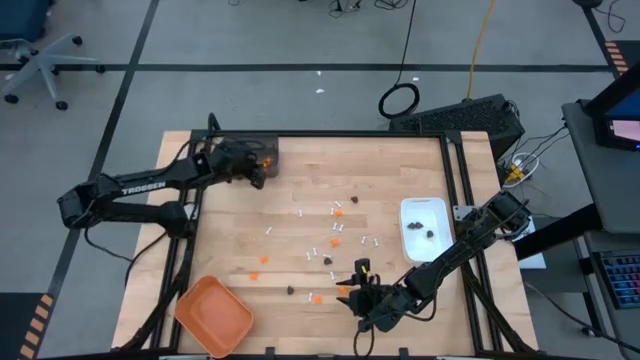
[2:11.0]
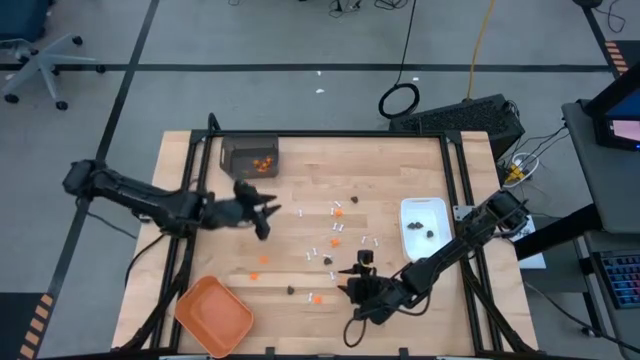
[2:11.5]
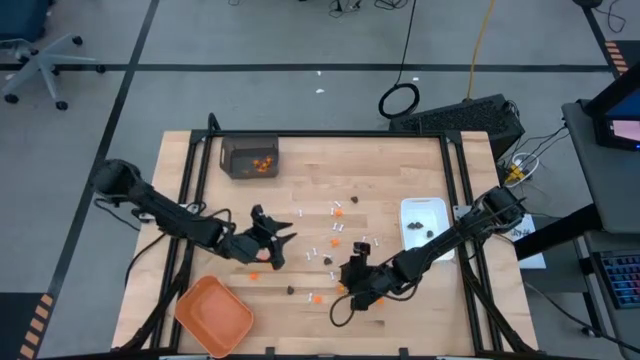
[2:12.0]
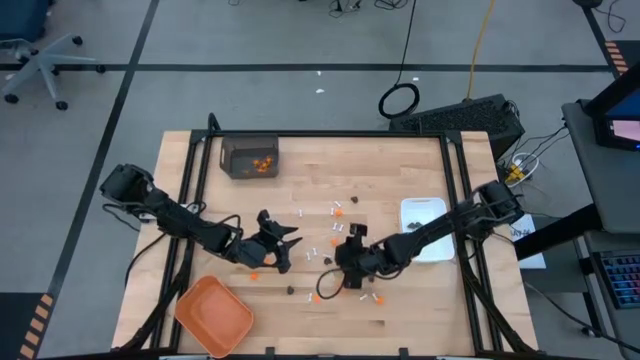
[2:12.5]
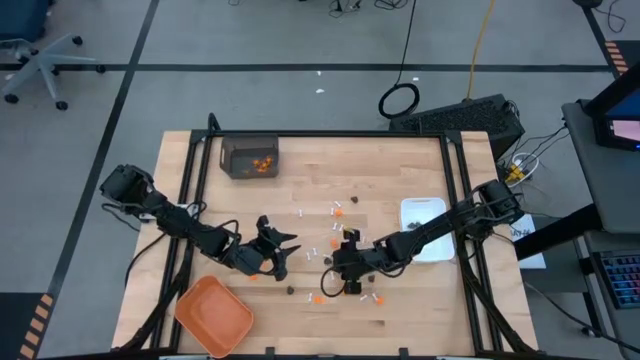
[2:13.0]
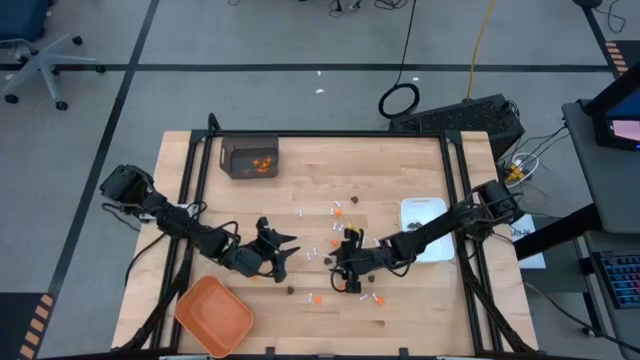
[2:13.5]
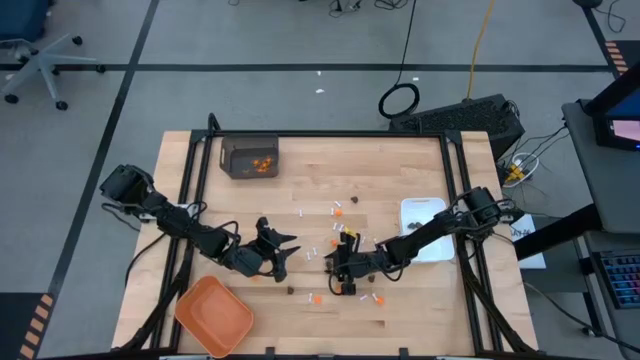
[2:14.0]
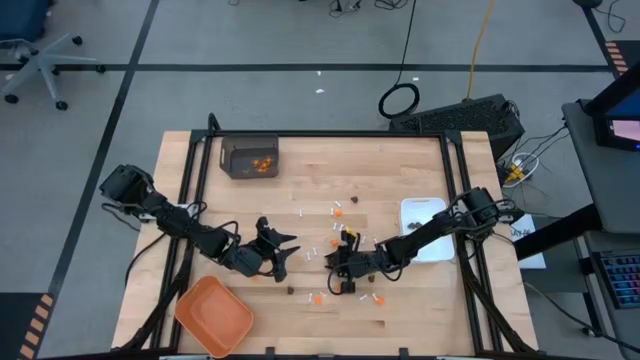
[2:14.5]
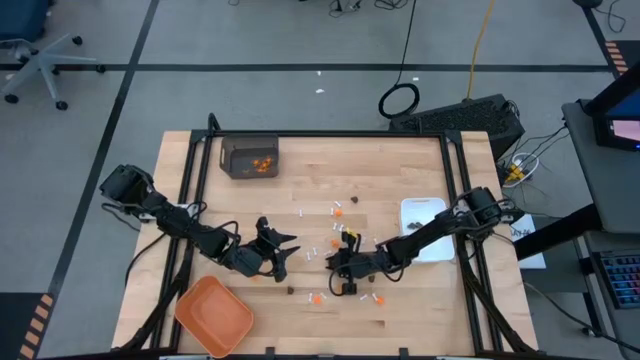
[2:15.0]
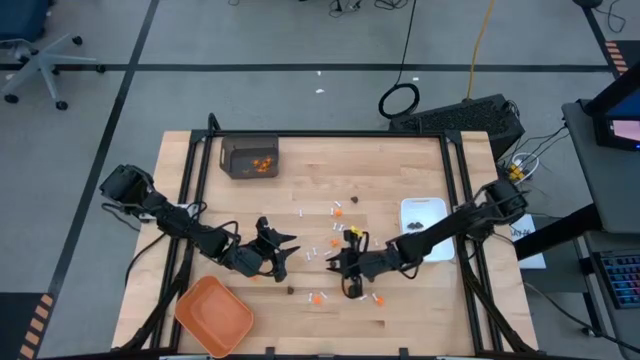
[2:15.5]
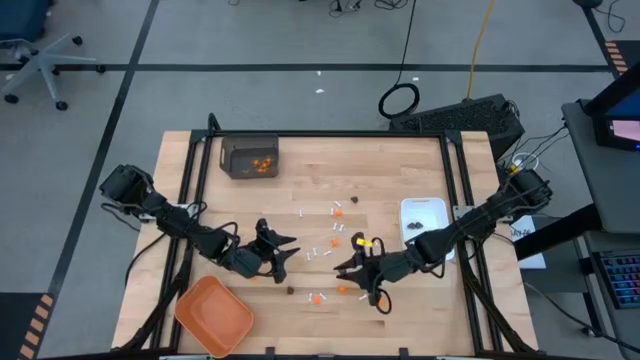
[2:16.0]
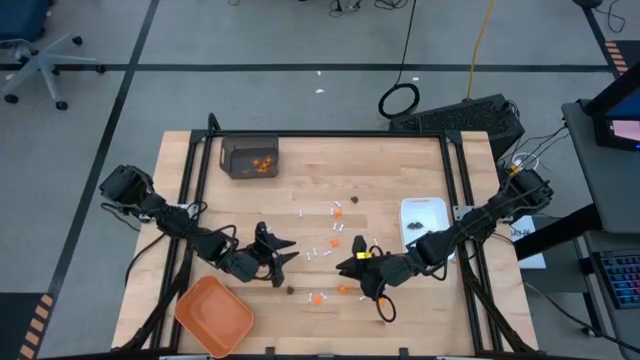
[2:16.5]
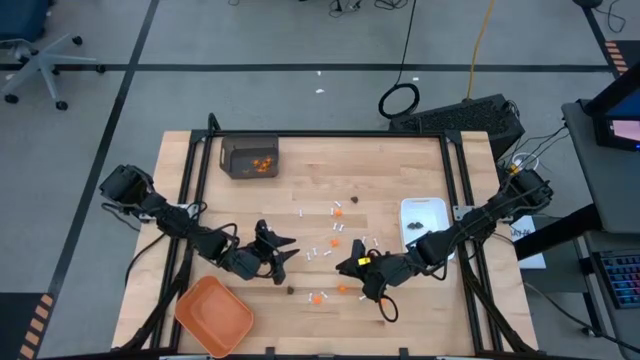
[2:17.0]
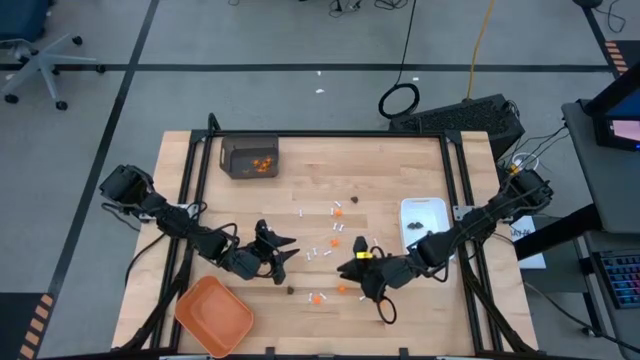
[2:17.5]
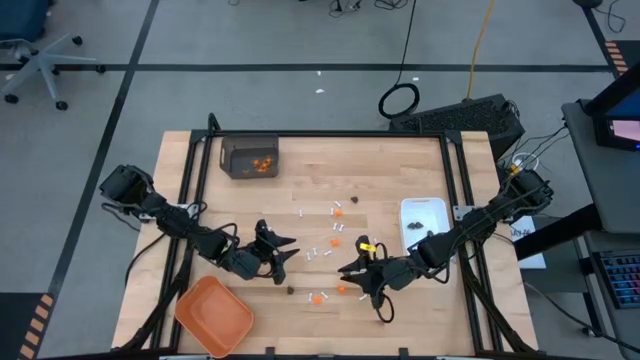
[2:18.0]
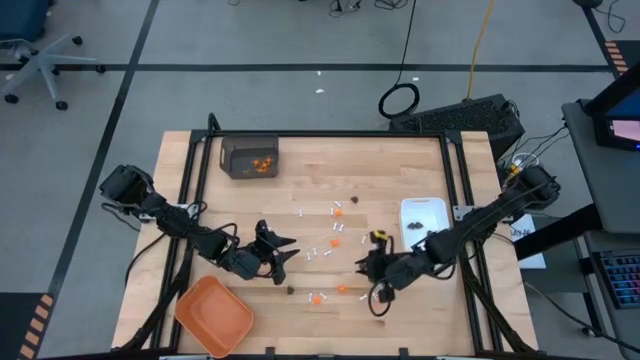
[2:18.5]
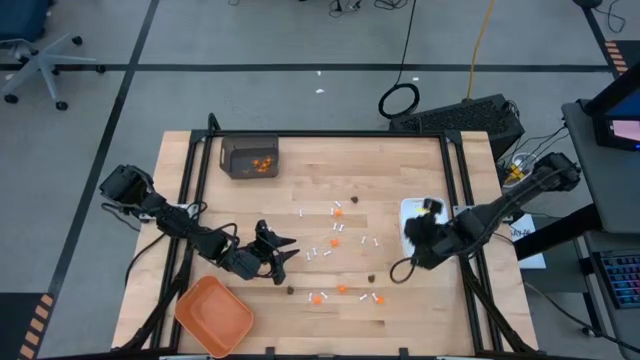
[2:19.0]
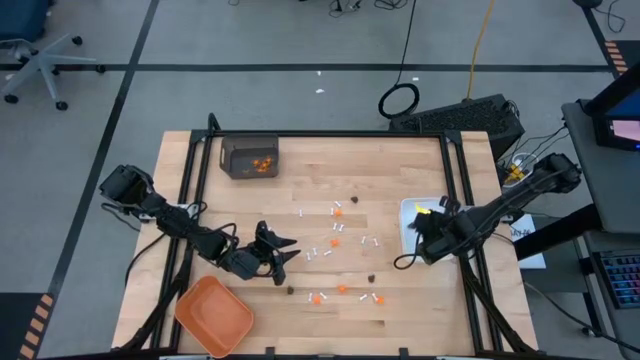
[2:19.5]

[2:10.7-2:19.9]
Task: Sort Halloween decoration
Put the black skull toy into the white bin

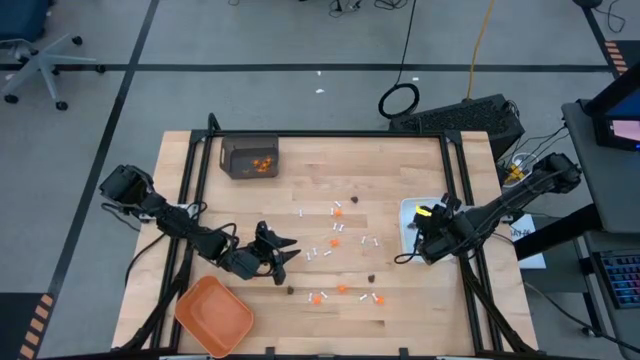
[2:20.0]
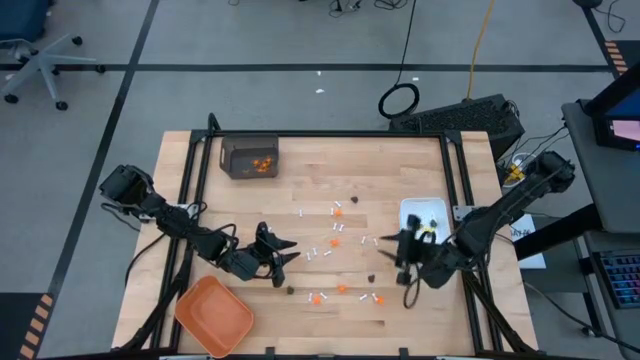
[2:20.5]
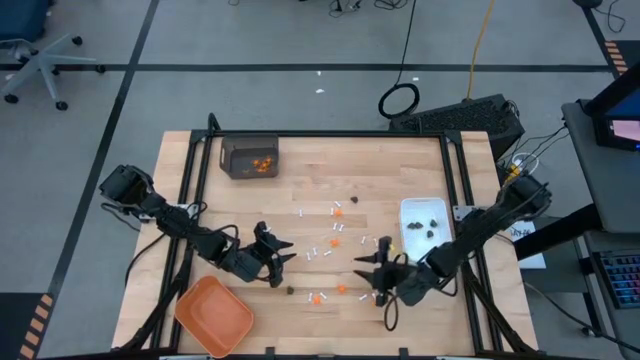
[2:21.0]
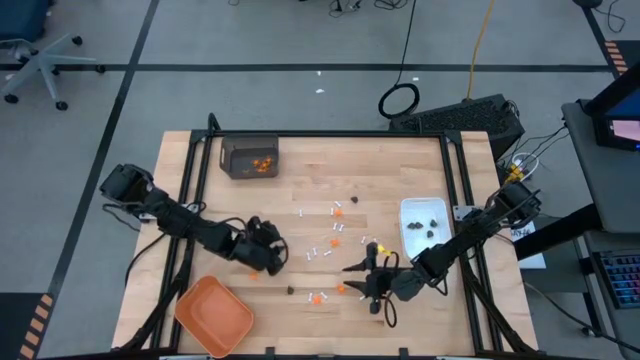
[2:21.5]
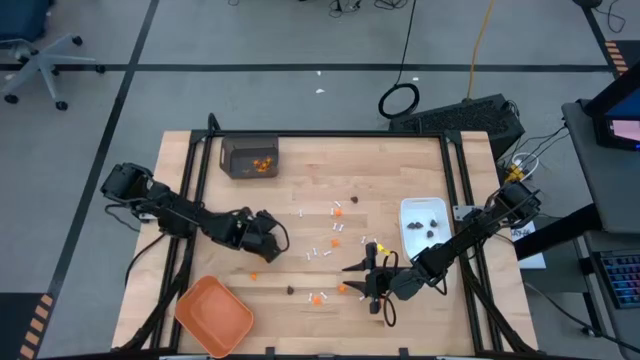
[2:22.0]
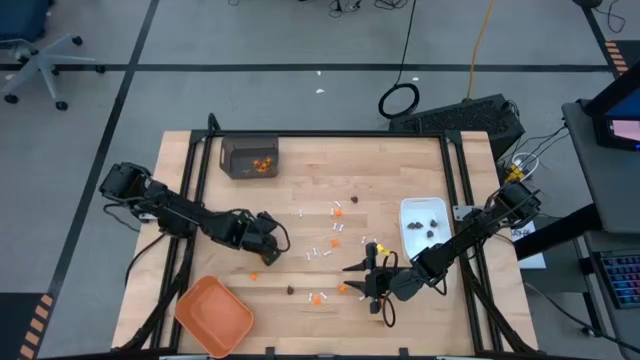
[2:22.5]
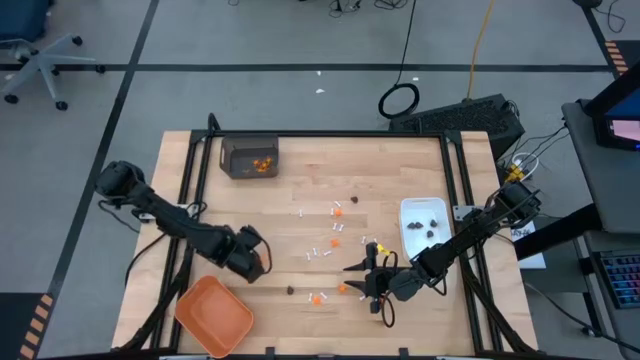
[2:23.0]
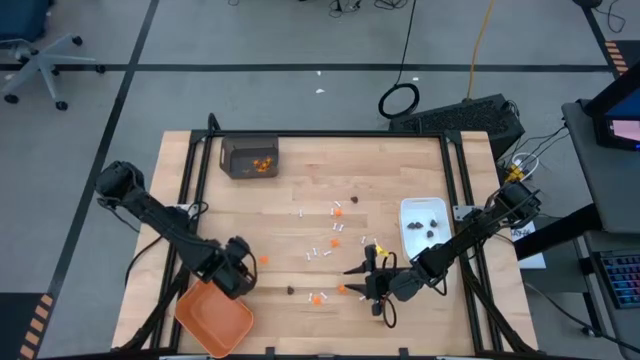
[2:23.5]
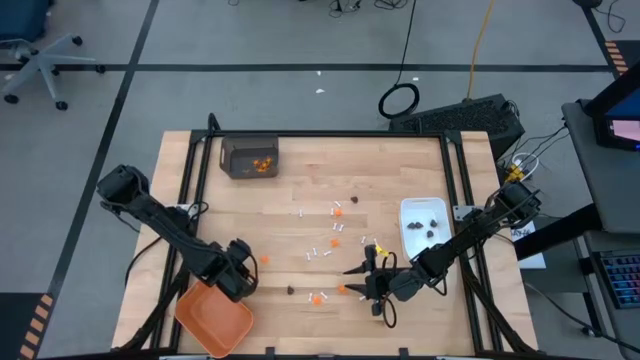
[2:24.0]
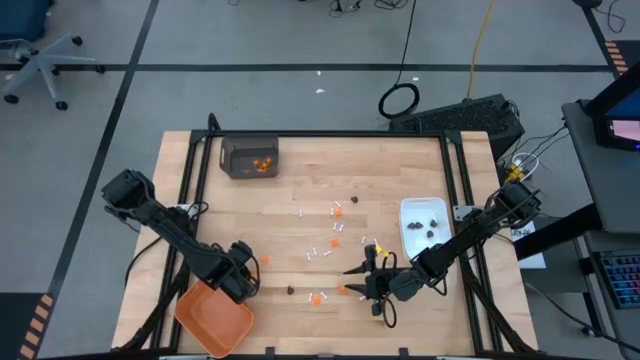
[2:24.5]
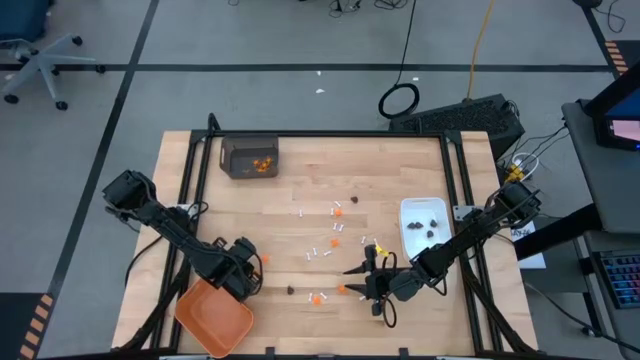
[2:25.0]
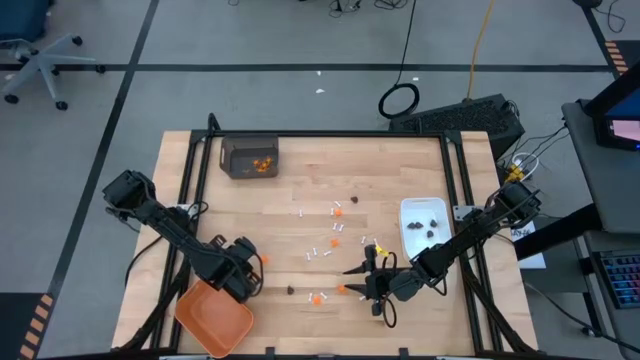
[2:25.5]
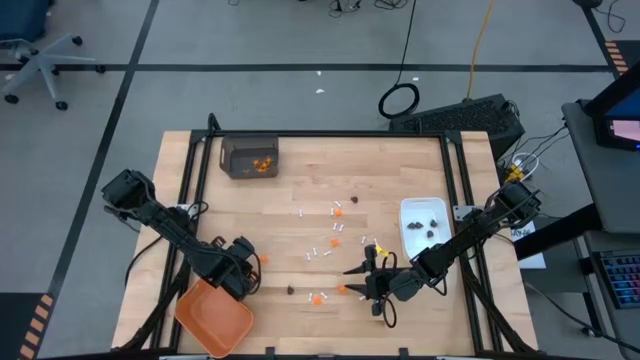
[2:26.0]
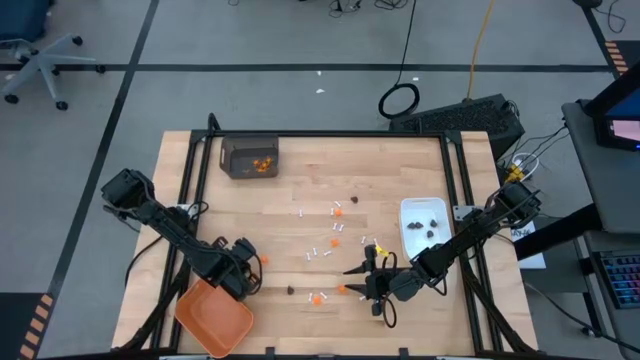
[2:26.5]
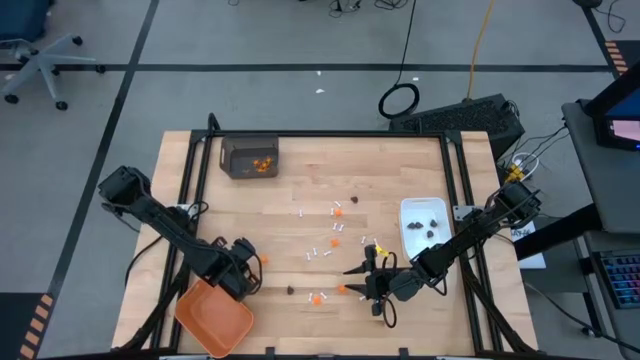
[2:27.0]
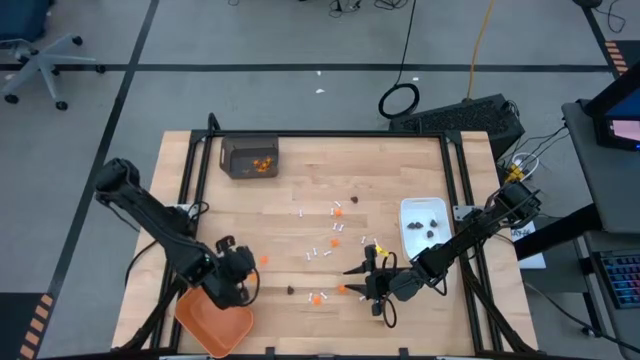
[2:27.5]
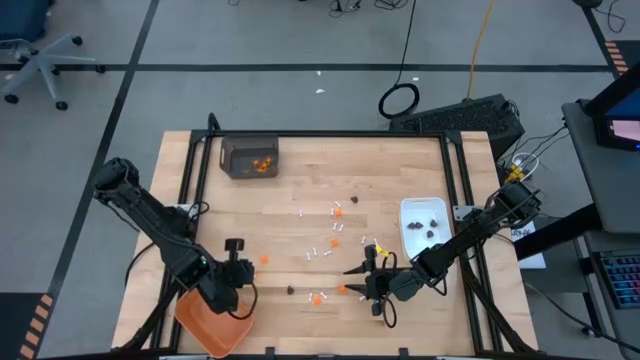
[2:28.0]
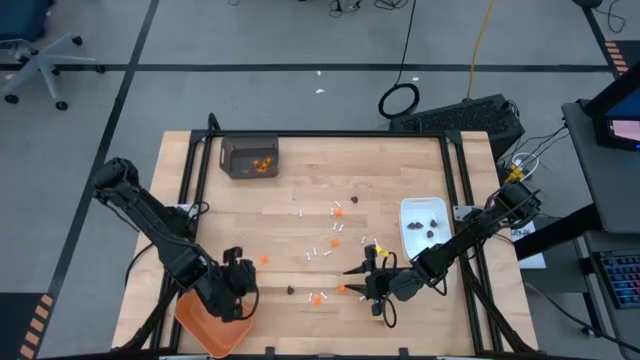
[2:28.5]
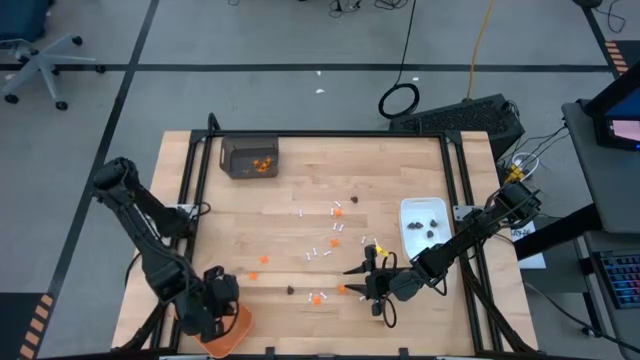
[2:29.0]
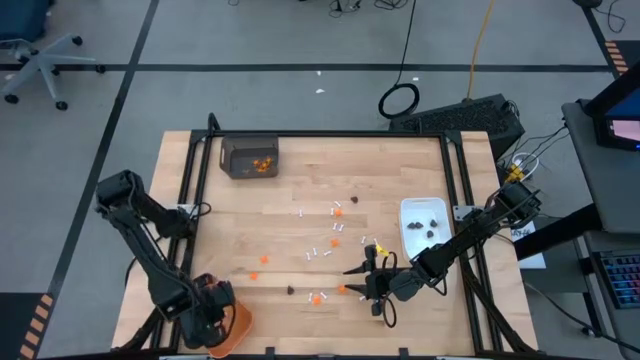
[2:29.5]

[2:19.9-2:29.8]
Put the white bone toy into the orange bin

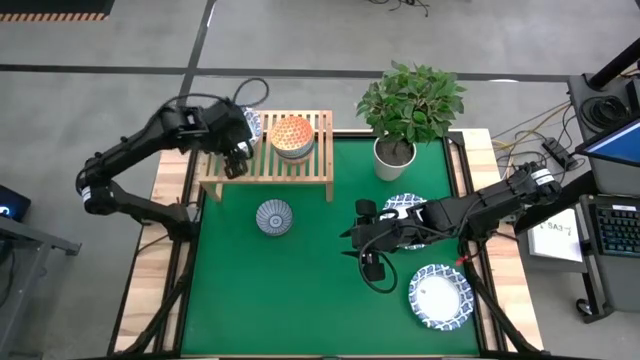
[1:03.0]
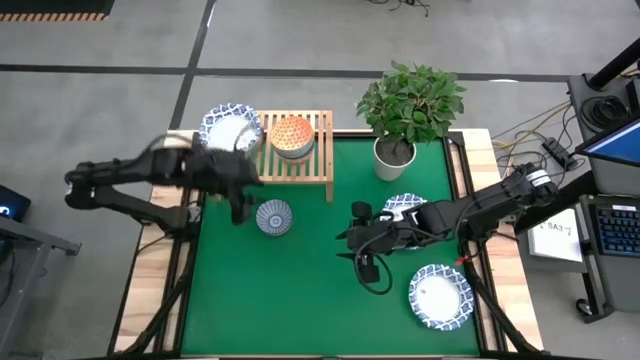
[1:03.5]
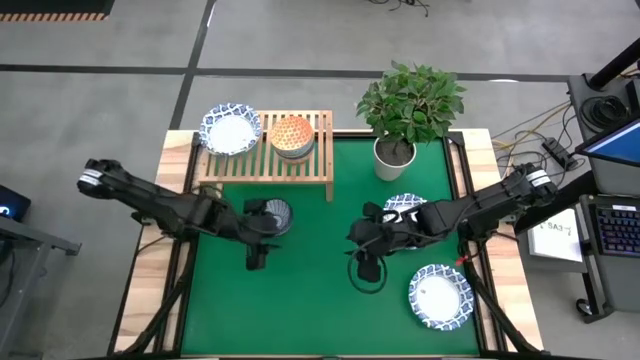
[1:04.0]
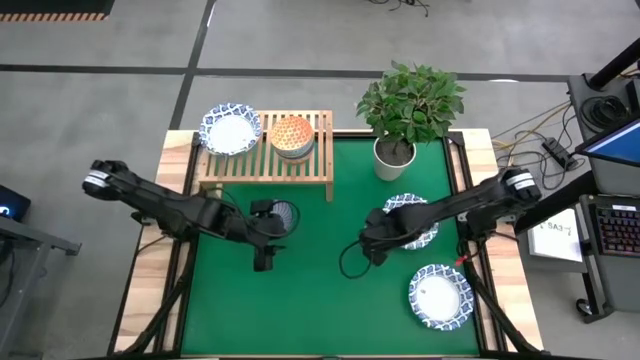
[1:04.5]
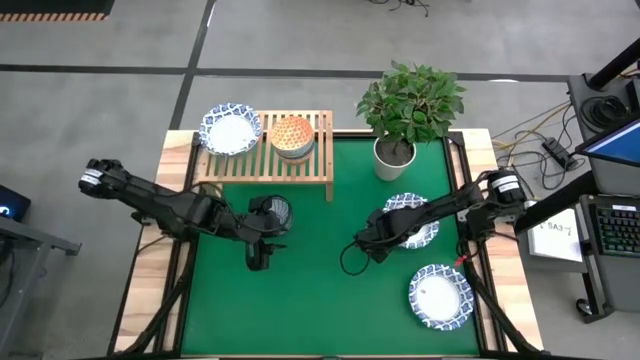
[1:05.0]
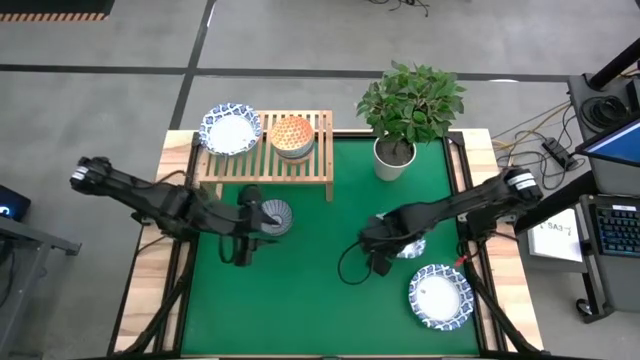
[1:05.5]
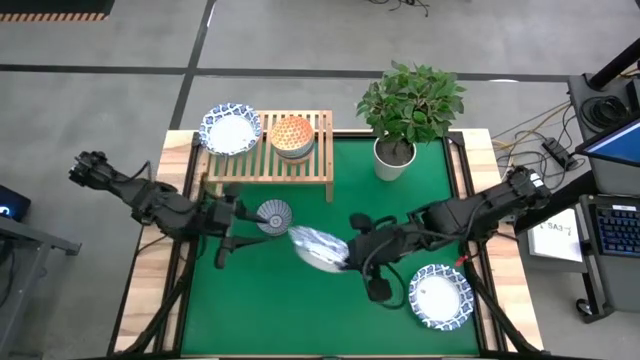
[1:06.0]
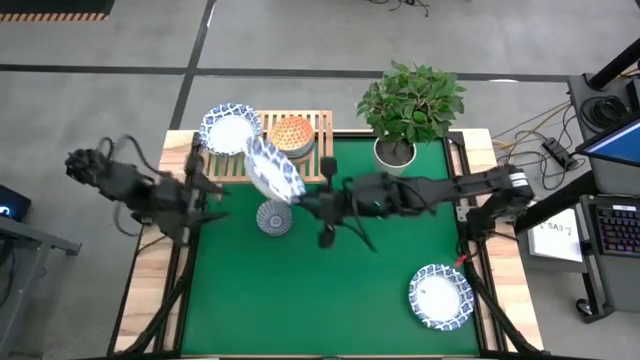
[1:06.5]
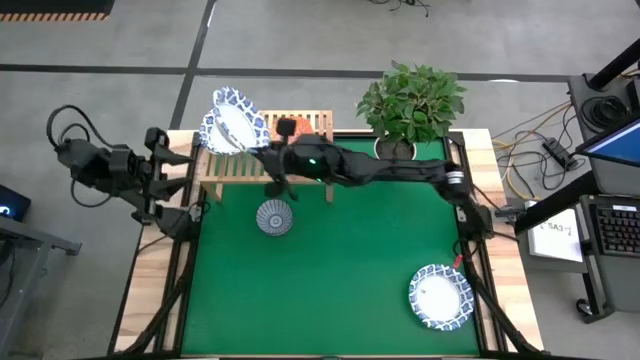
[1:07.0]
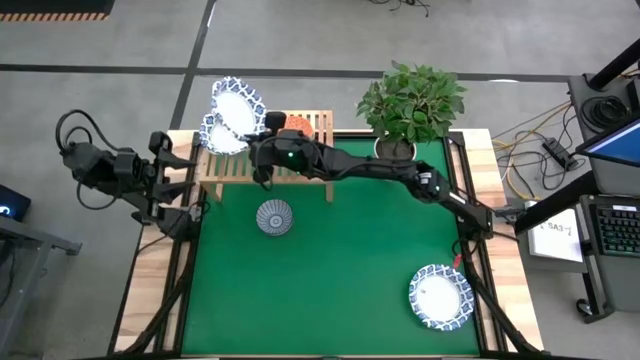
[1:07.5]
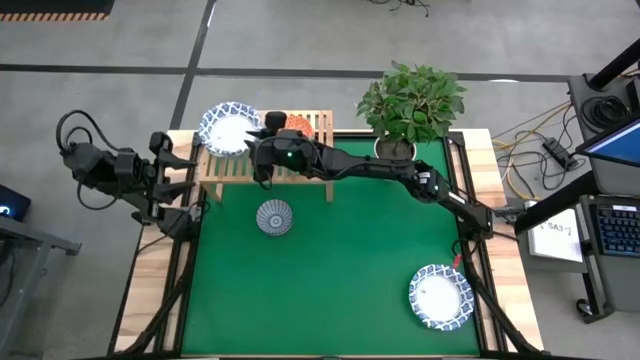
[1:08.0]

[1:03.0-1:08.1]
Task: Place and stack bowls onto a shelf
Stack the top white bowl on top of the other white bowl on the shelf
